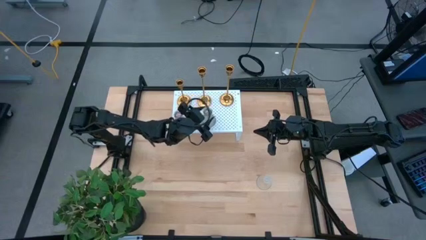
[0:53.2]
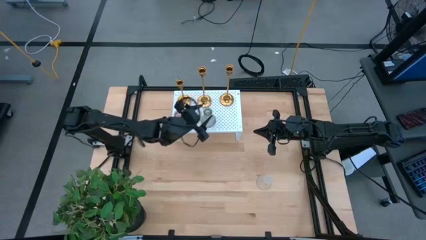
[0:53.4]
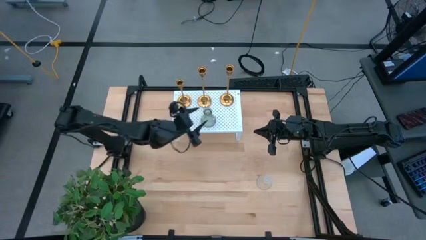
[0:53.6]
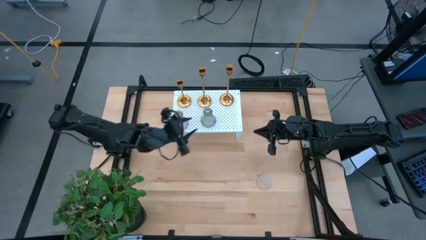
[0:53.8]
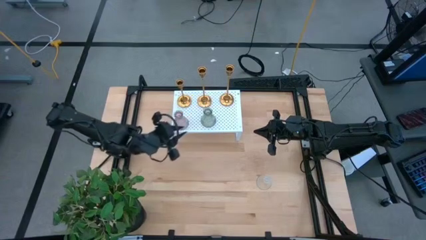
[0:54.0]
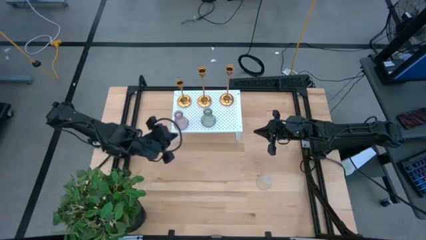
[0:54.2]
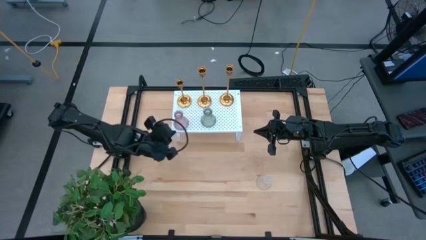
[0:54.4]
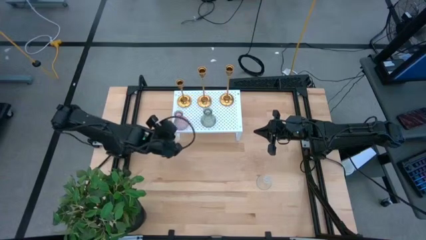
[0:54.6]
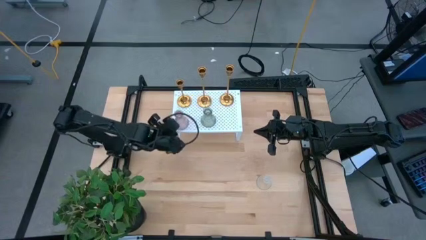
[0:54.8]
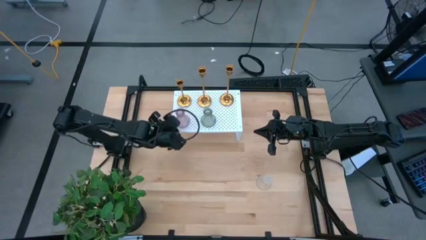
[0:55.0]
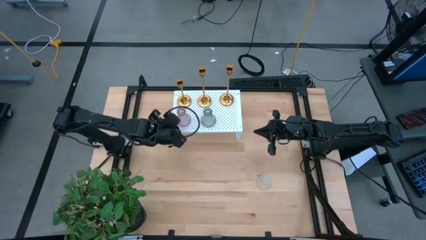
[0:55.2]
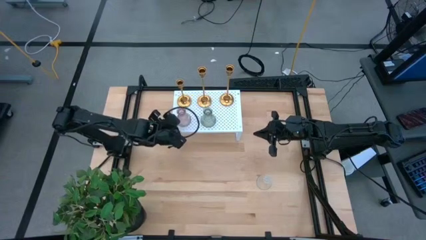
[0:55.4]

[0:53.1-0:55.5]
Task: Pick & Place candle stick holders
Adjust the pink glass candle holder on the shelf

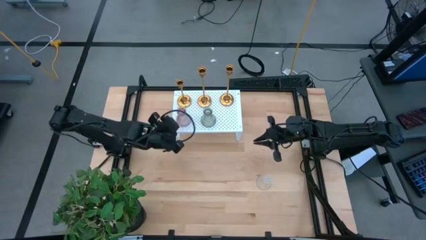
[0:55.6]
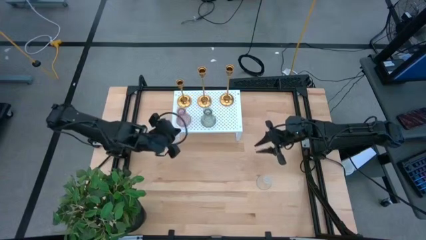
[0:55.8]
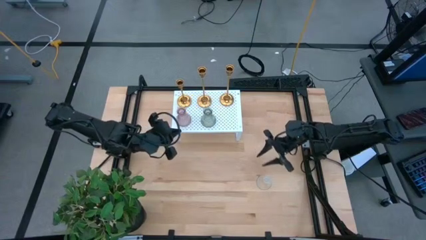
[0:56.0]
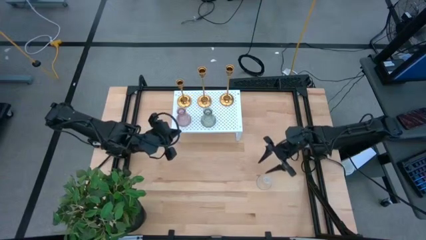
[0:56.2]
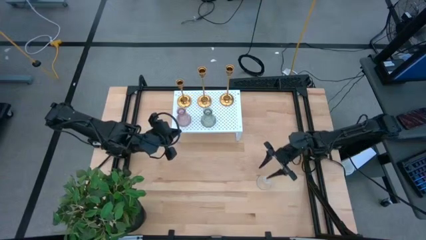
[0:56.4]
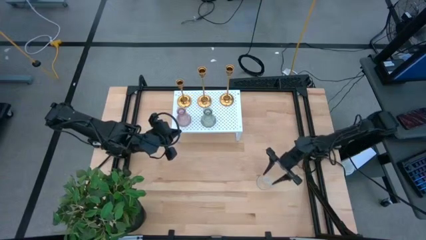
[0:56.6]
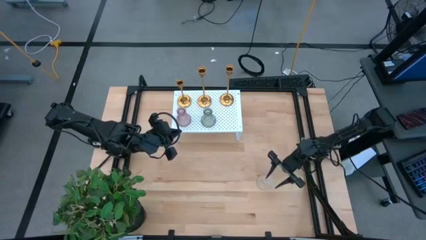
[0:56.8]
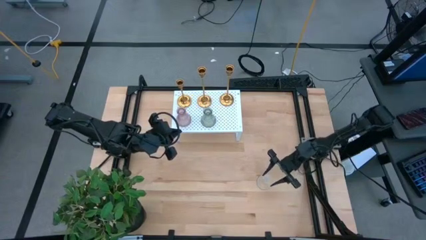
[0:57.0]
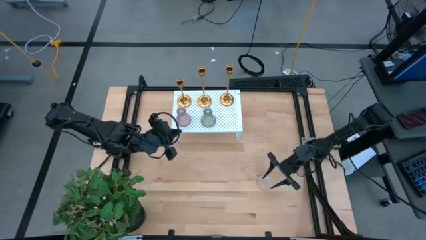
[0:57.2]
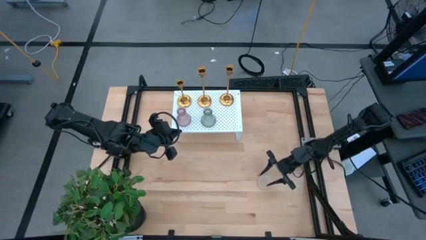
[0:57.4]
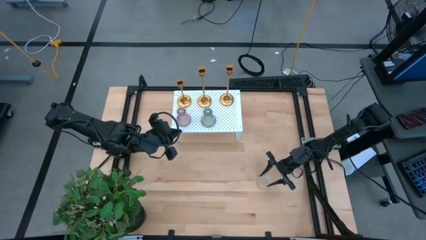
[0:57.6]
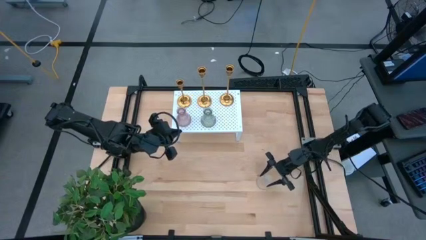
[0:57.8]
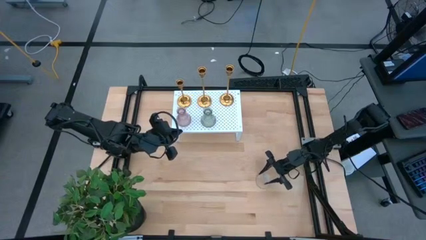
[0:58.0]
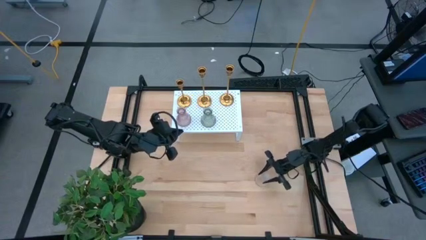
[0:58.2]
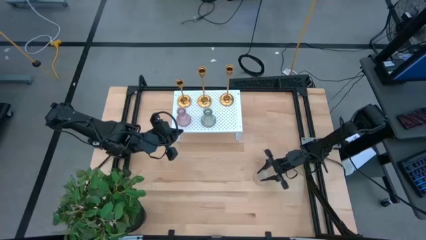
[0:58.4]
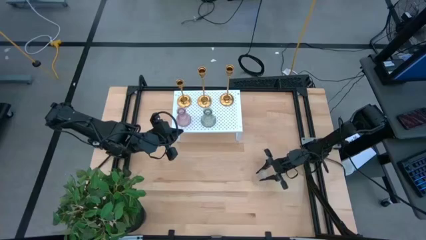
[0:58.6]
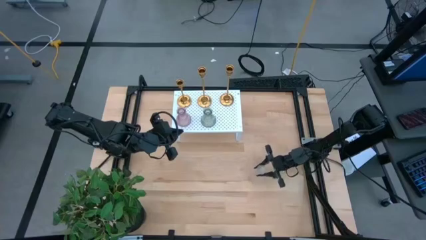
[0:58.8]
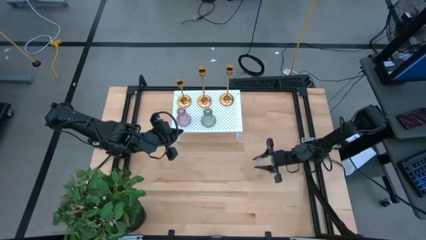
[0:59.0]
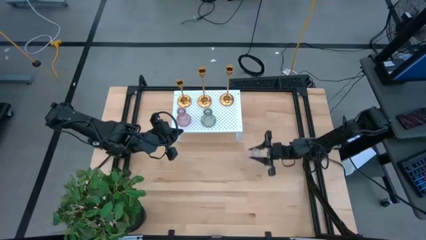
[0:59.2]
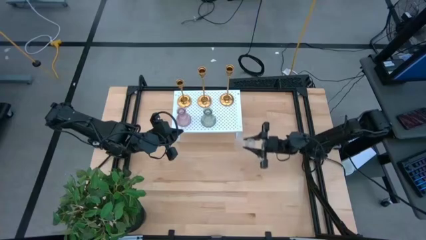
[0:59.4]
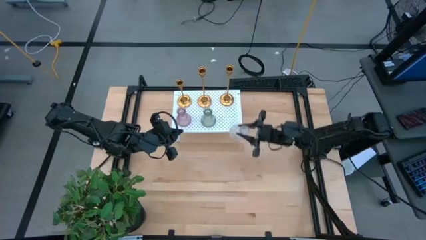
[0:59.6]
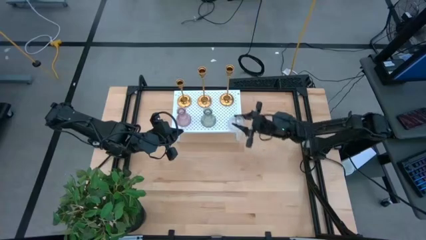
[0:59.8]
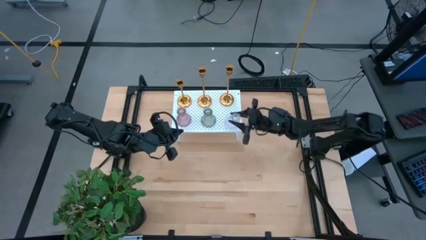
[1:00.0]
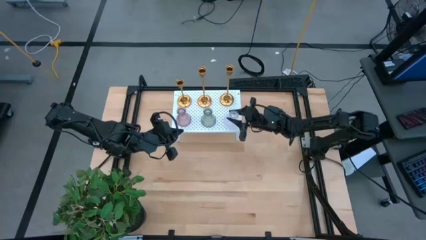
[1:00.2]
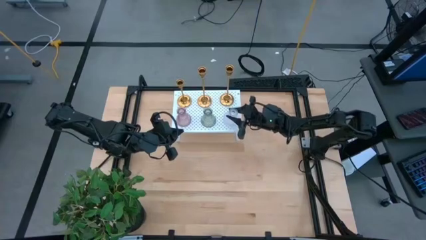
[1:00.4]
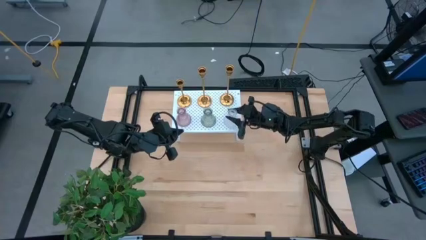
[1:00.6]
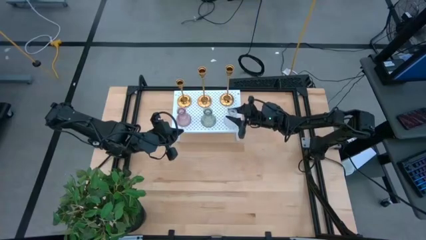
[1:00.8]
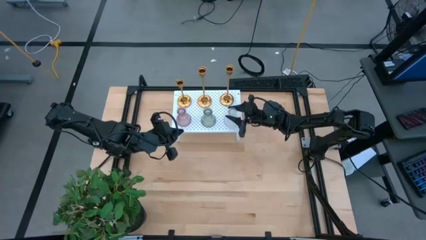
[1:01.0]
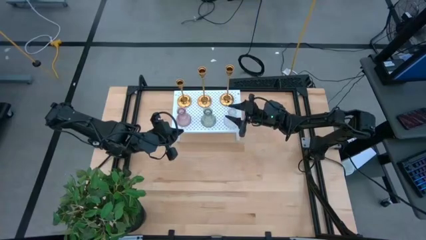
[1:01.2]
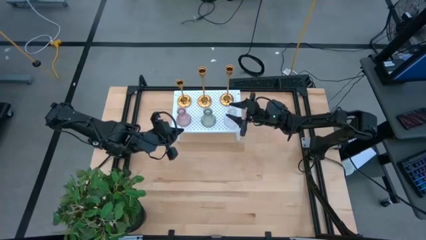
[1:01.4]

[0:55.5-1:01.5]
Put the transparent glass candle holder on the shelf aligned with the other glass candle holders

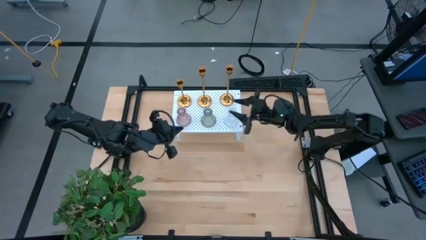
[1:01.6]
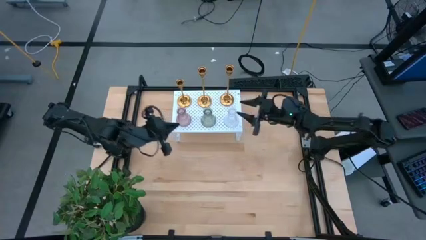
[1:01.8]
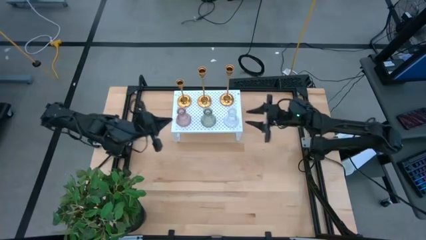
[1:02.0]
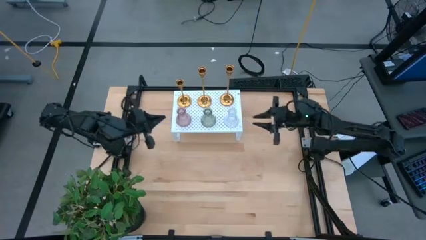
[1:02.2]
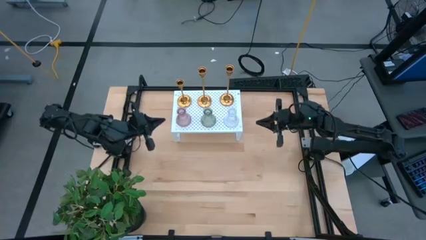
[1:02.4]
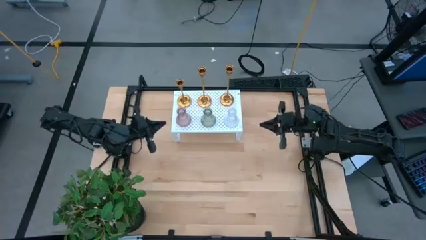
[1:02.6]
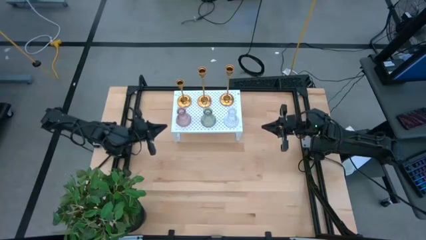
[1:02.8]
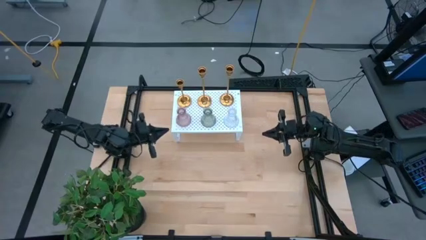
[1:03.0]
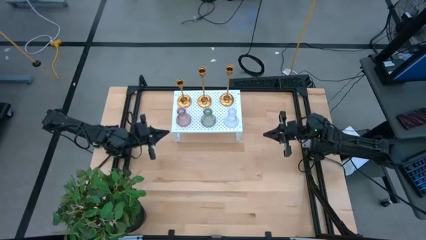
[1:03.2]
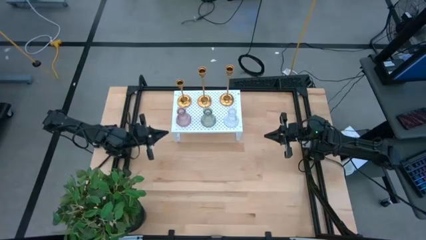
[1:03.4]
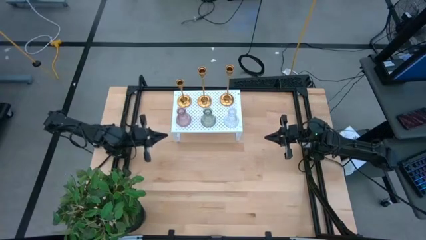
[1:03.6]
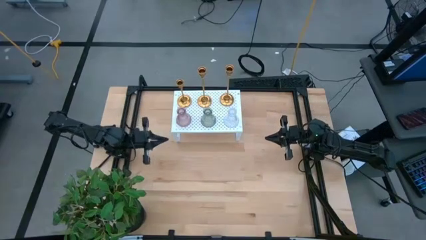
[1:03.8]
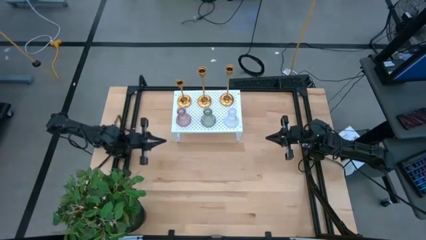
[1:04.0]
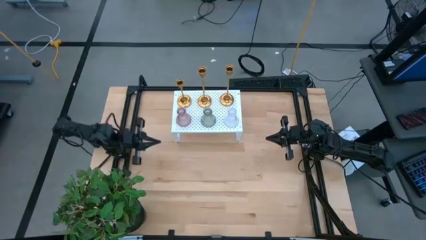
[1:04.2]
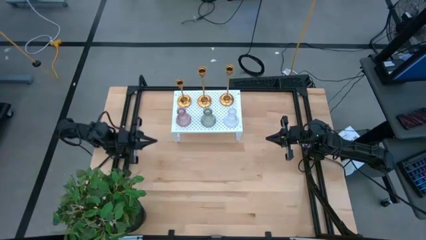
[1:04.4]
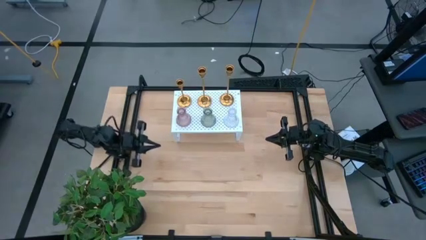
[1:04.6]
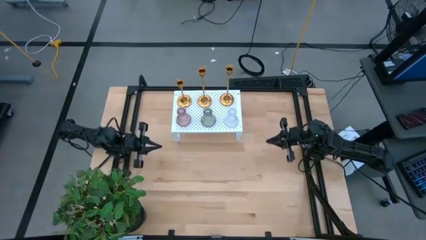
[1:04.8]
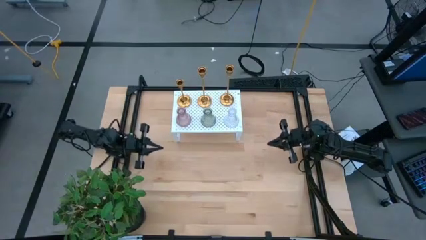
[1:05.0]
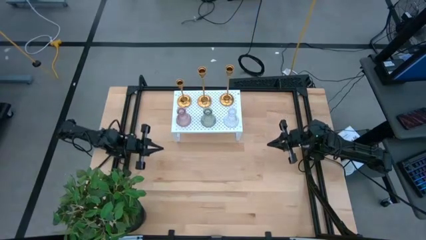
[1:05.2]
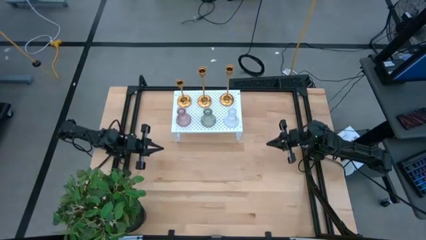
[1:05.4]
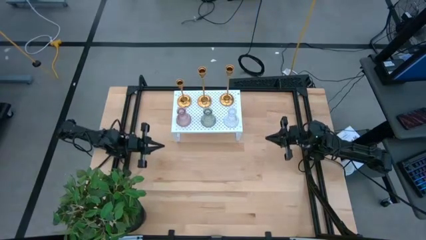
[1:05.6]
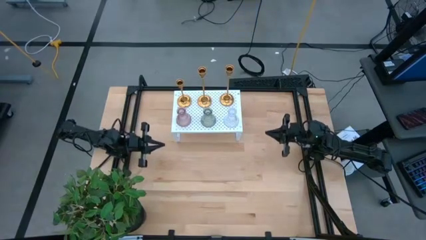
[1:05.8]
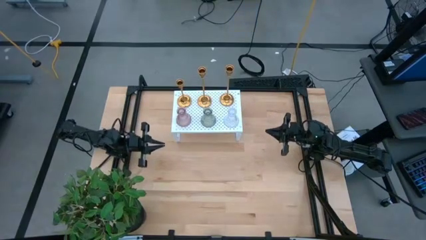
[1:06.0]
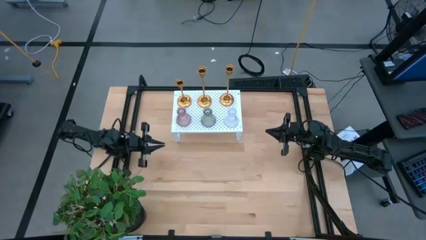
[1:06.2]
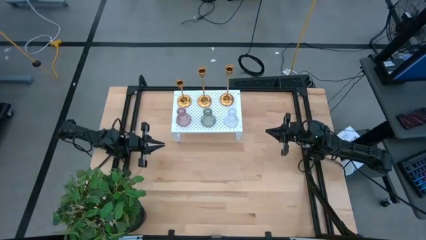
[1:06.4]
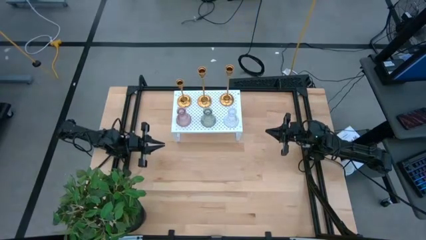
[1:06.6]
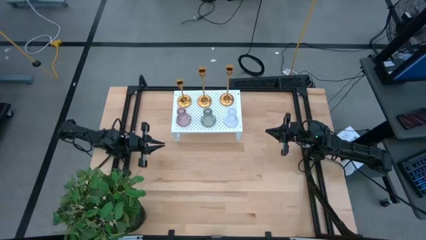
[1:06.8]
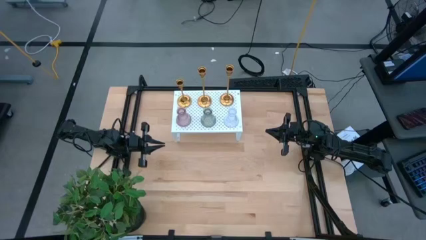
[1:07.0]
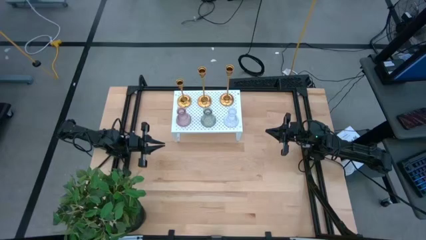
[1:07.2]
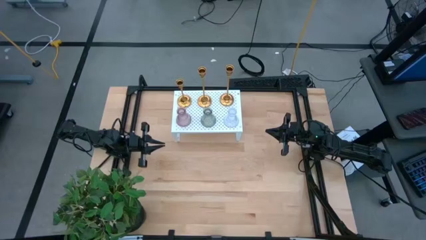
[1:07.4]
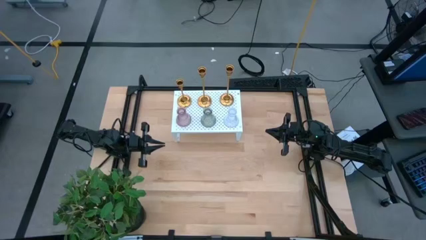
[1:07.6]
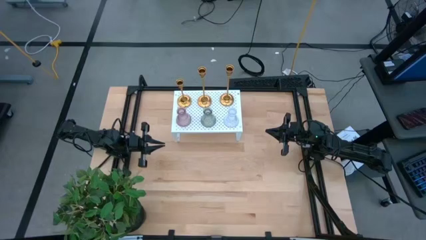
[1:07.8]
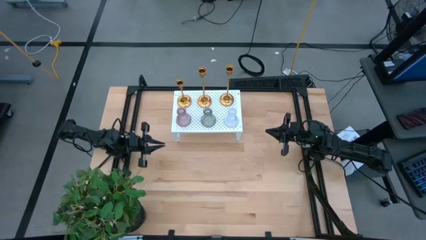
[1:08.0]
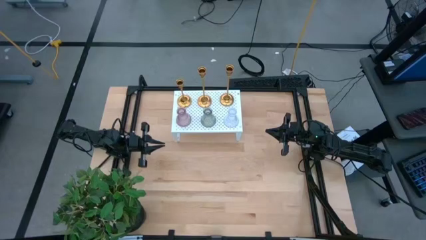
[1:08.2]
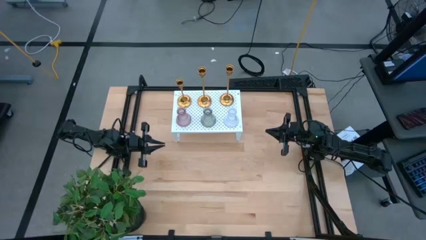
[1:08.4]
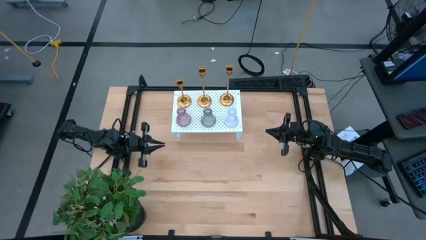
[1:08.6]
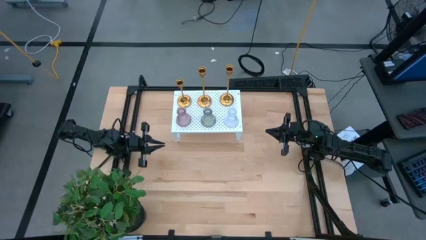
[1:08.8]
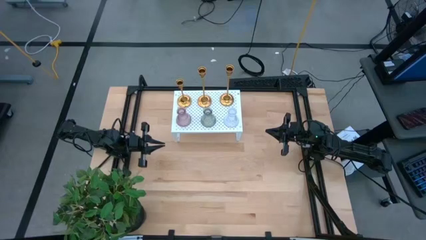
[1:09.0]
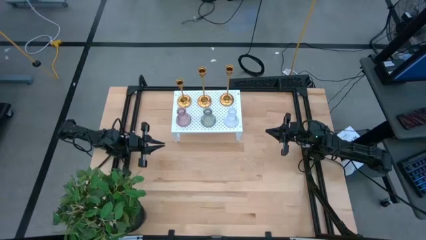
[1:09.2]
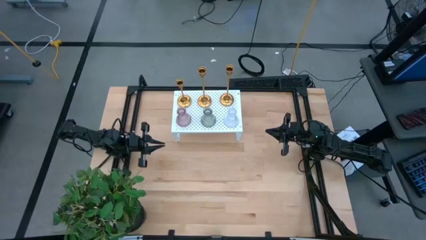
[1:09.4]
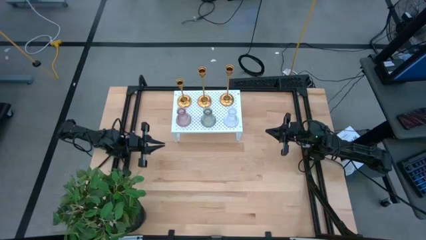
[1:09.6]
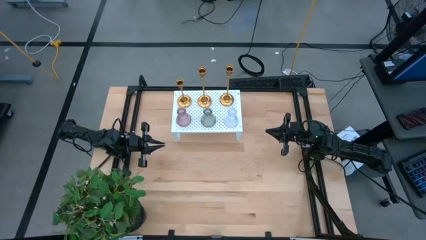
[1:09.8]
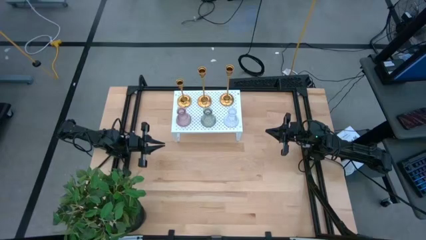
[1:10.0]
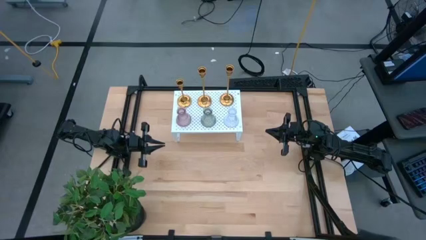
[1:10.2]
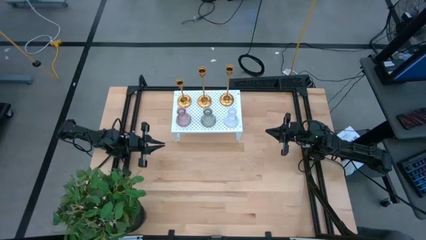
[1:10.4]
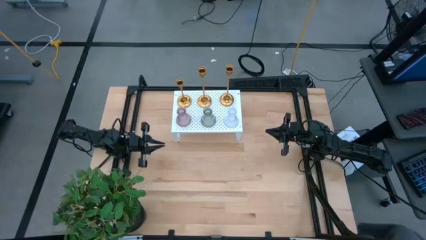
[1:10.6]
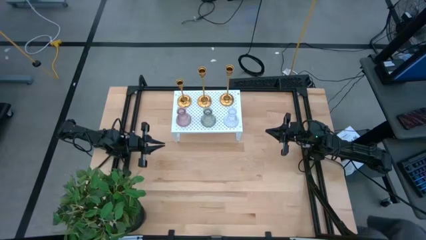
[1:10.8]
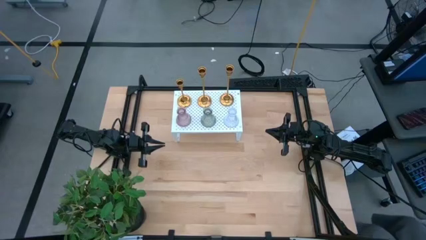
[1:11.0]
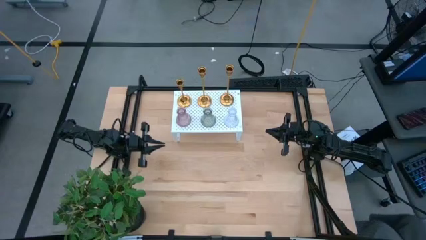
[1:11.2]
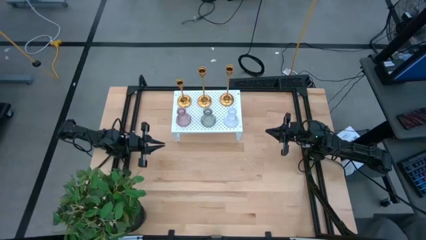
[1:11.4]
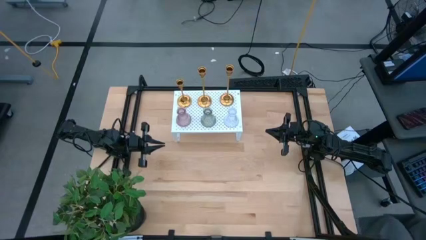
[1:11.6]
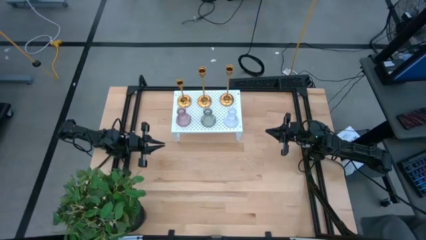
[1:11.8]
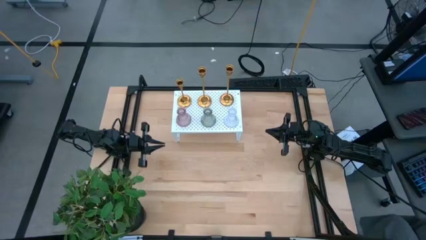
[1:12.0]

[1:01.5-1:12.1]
Return to Home Position
